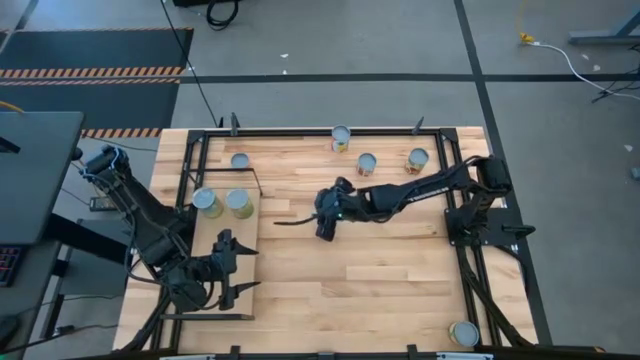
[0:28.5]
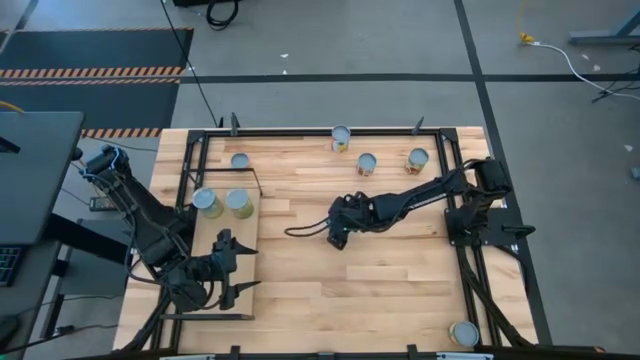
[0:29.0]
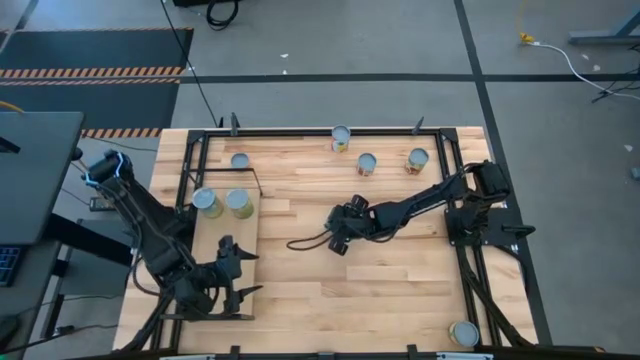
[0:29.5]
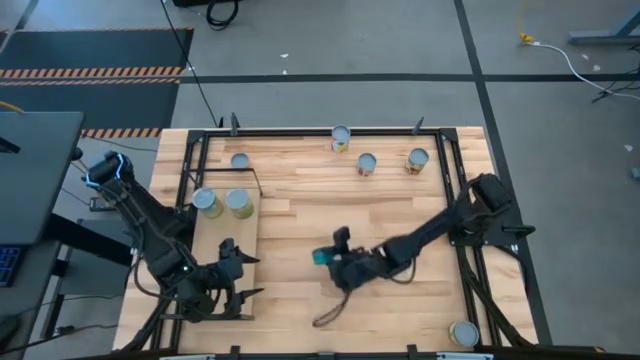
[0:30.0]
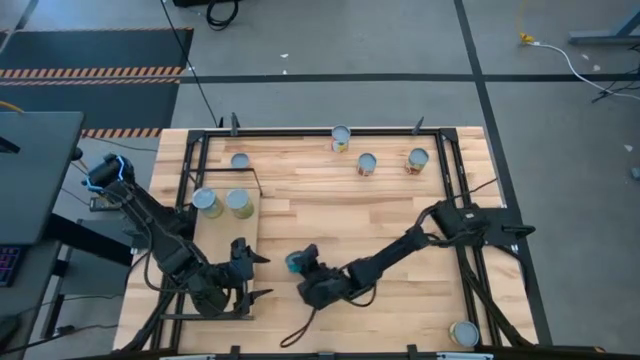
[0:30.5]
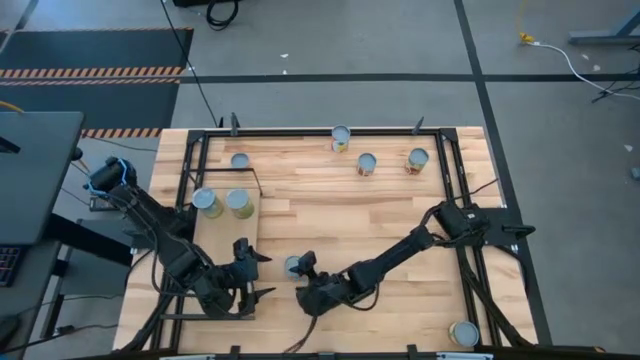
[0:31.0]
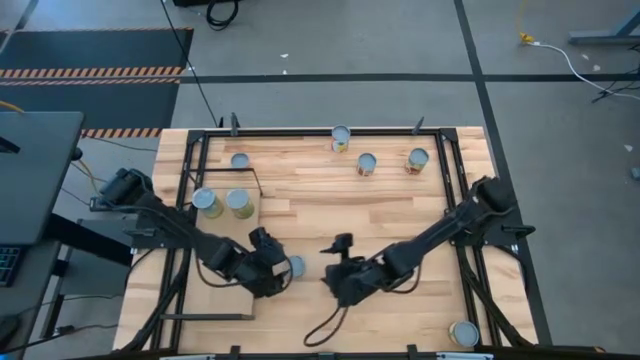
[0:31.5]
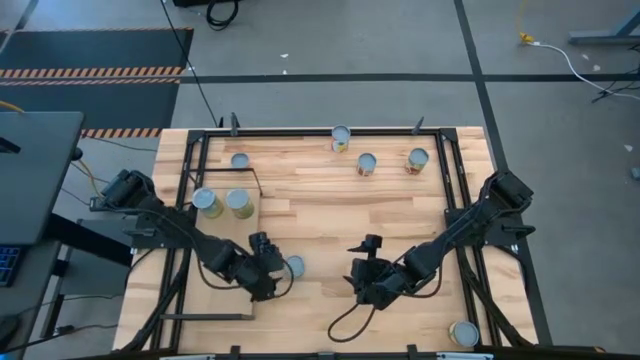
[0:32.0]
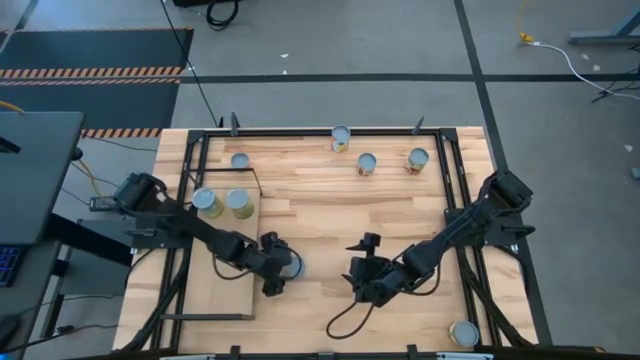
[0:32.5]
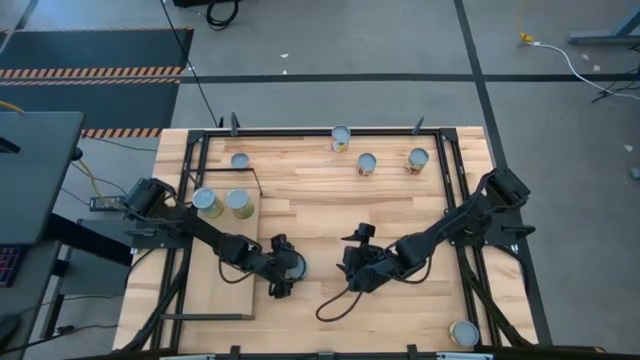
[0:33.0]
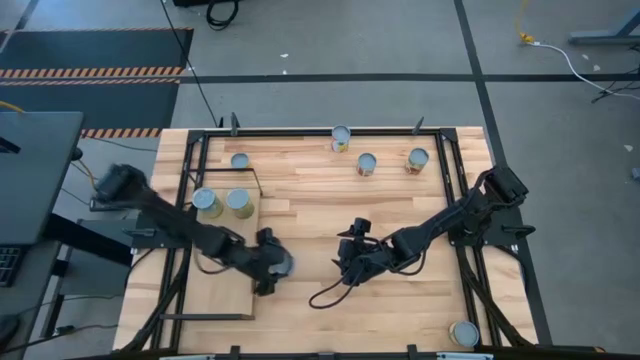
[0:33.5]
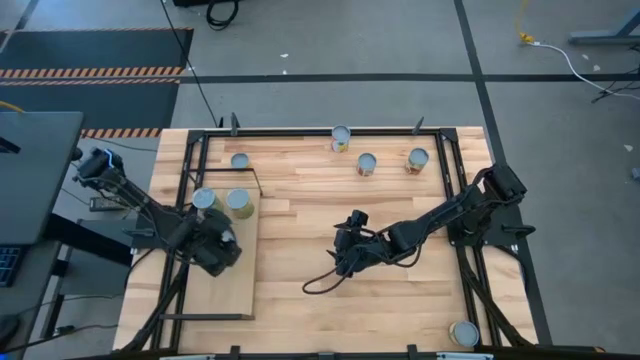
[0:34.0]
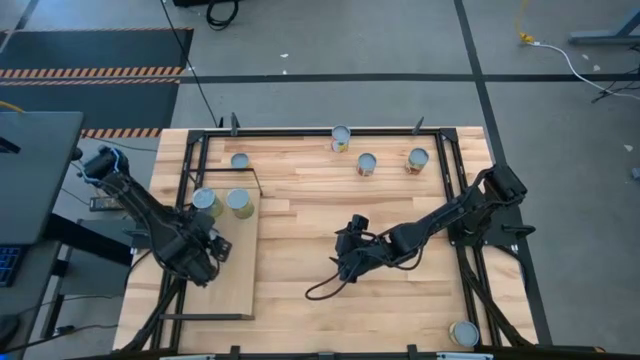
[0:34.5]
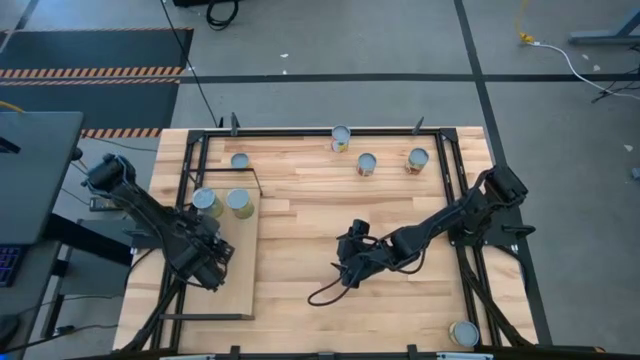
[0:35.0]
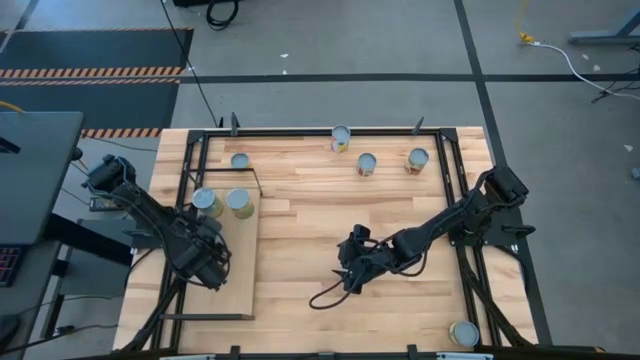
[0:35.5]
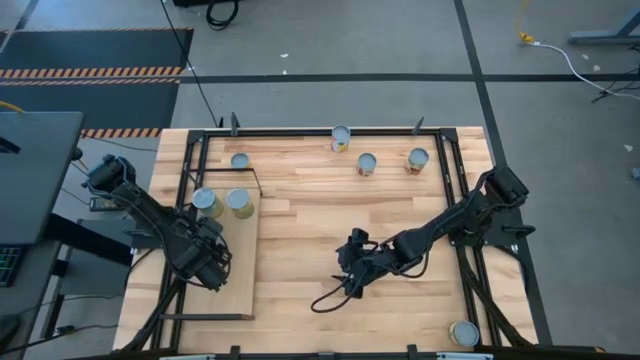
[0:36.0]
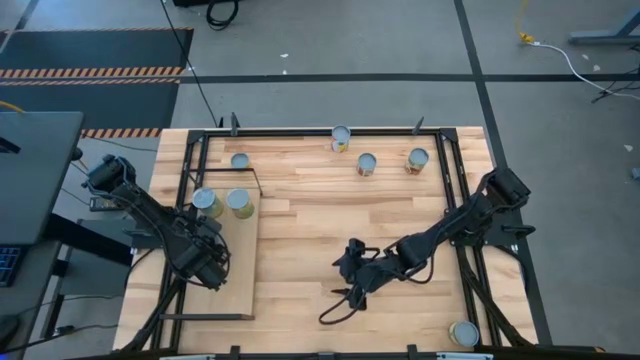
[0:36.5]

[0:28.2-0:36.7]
Task: Pick and place cans onto a shelf
Put the canned tuna on the shelf

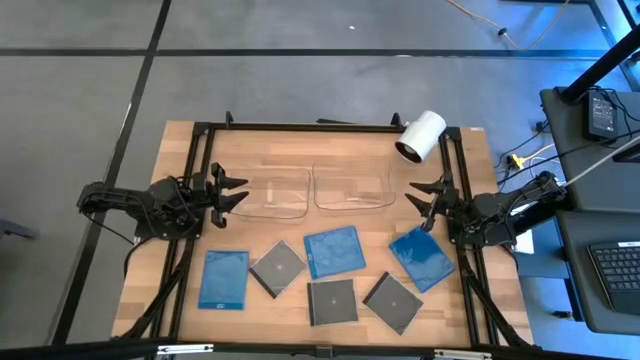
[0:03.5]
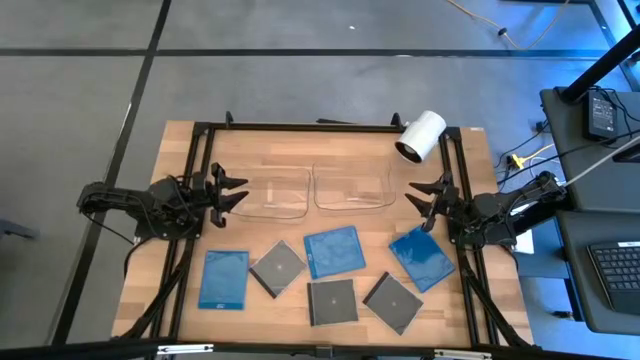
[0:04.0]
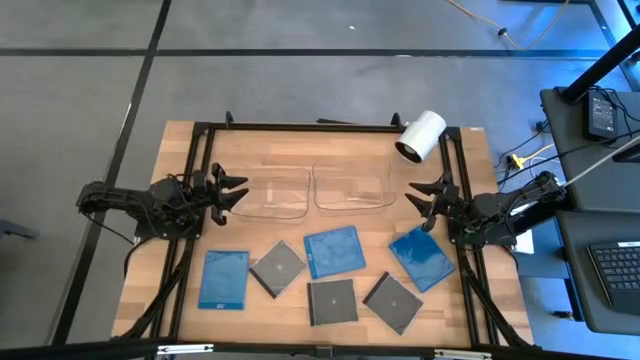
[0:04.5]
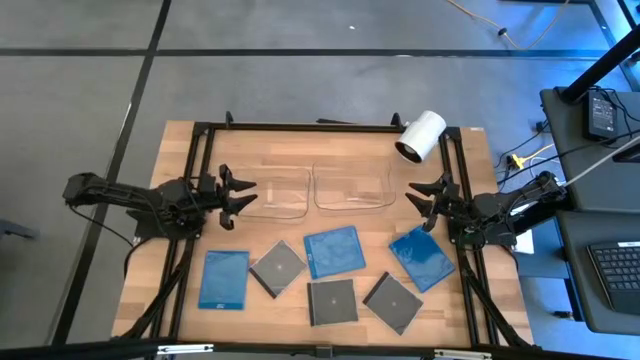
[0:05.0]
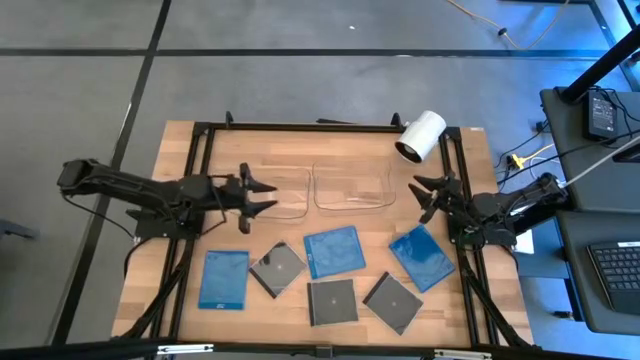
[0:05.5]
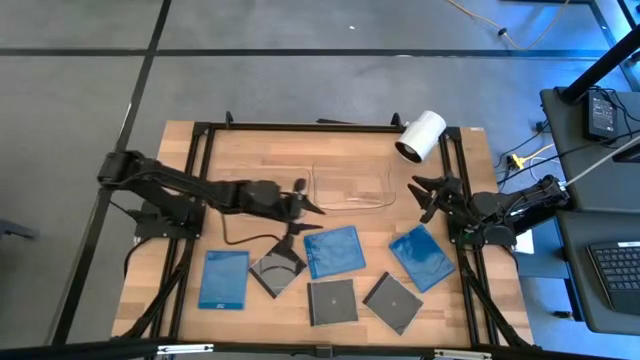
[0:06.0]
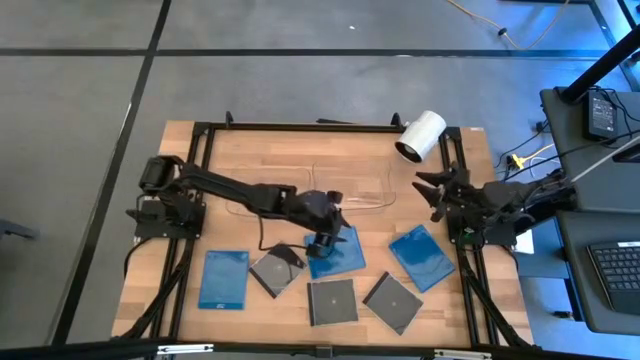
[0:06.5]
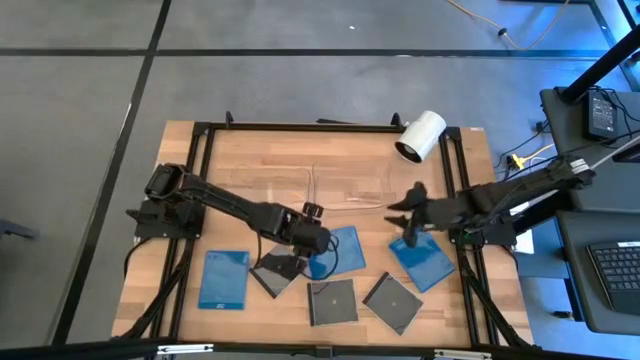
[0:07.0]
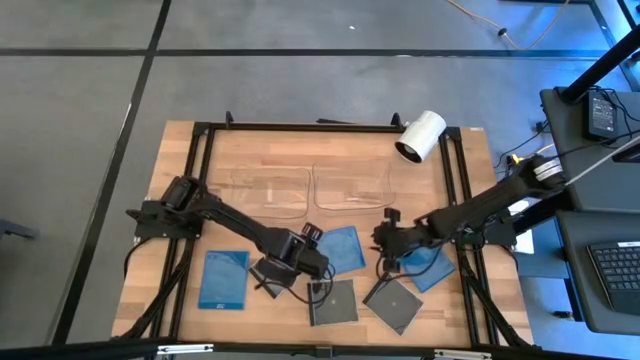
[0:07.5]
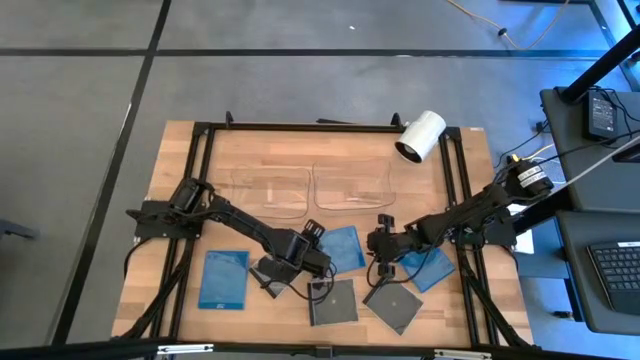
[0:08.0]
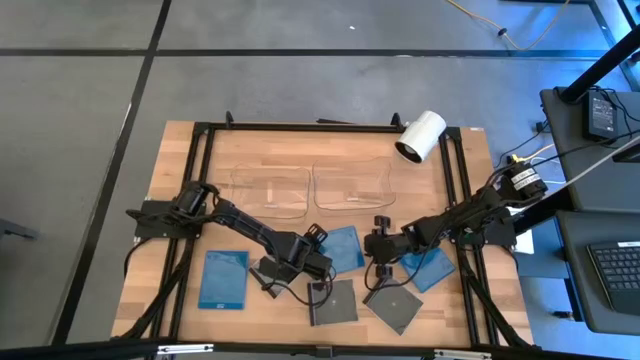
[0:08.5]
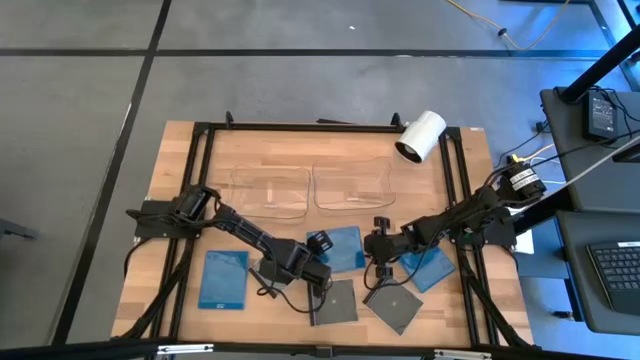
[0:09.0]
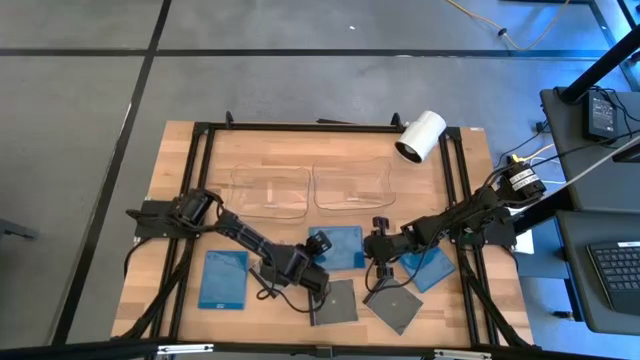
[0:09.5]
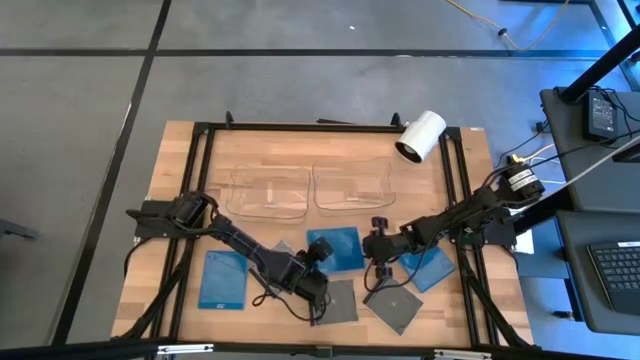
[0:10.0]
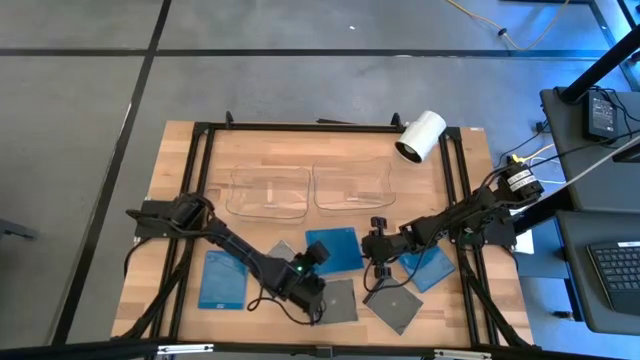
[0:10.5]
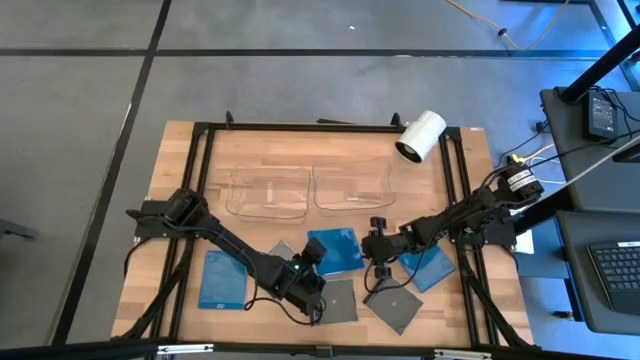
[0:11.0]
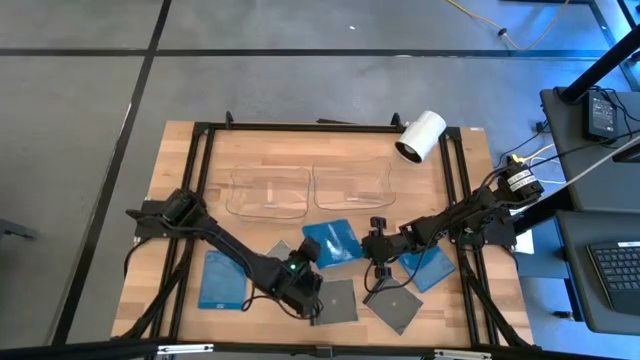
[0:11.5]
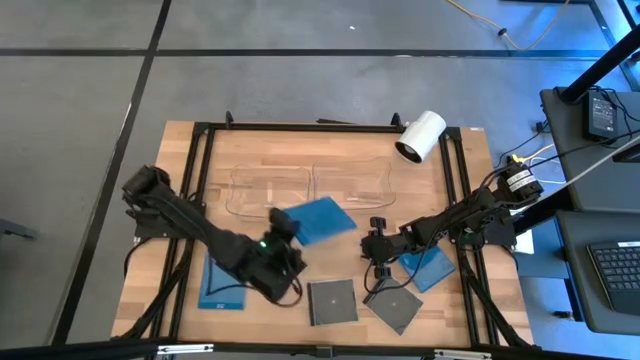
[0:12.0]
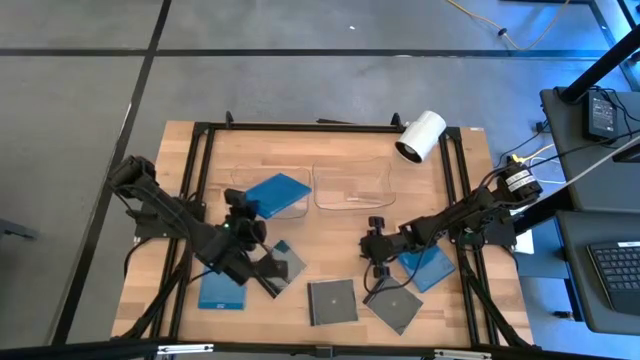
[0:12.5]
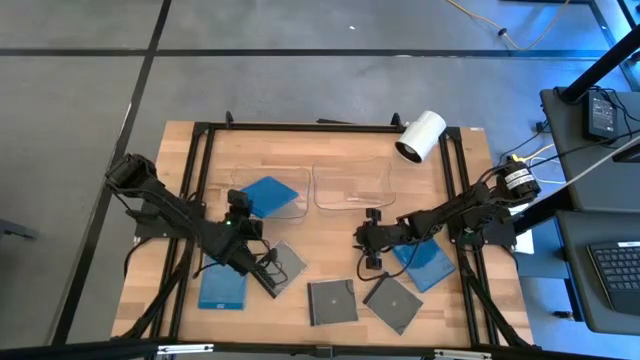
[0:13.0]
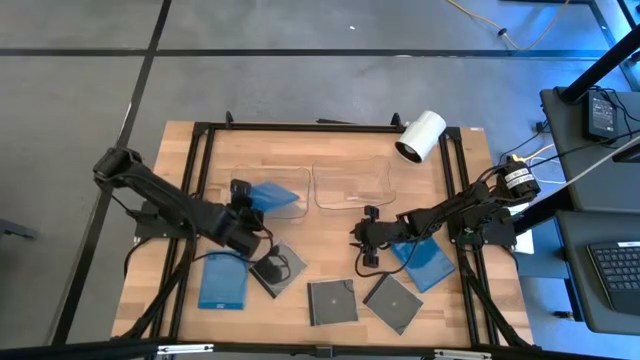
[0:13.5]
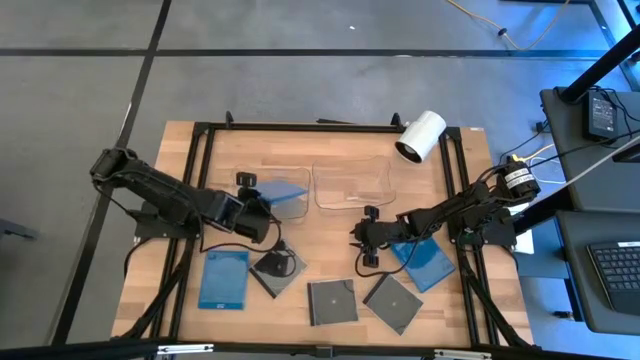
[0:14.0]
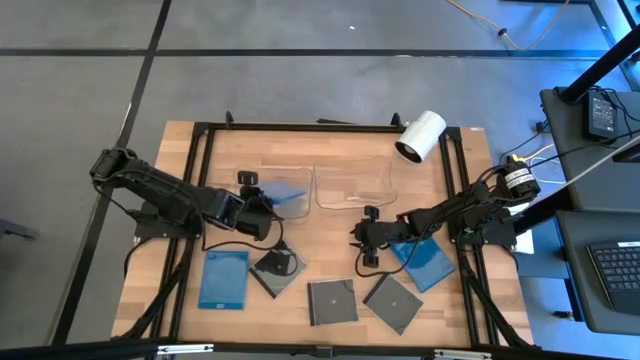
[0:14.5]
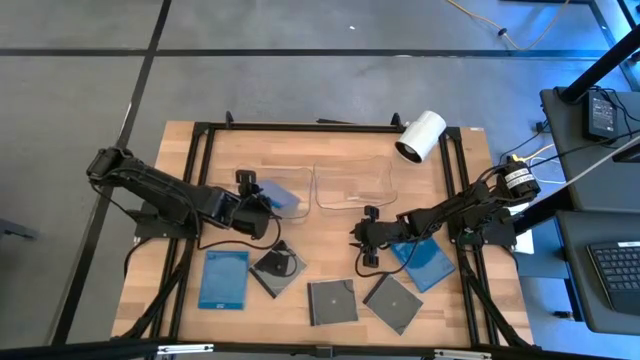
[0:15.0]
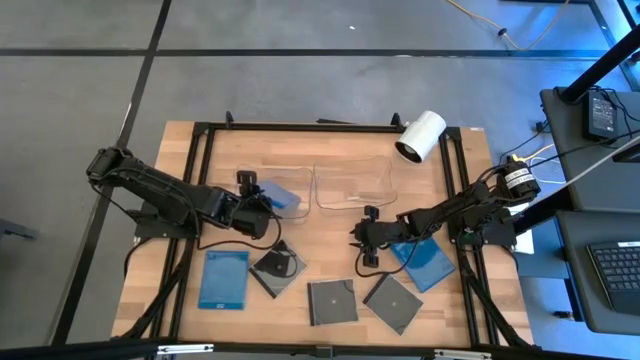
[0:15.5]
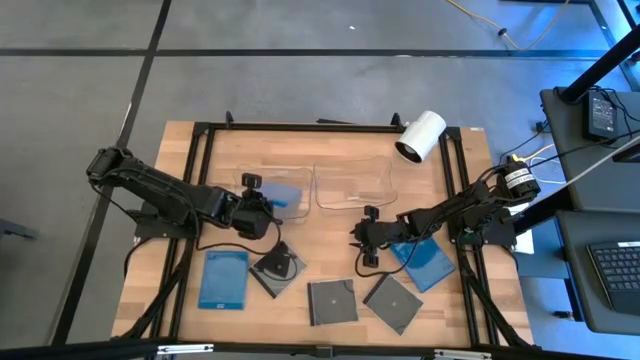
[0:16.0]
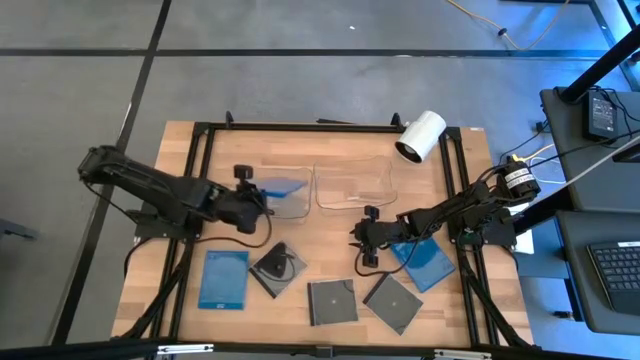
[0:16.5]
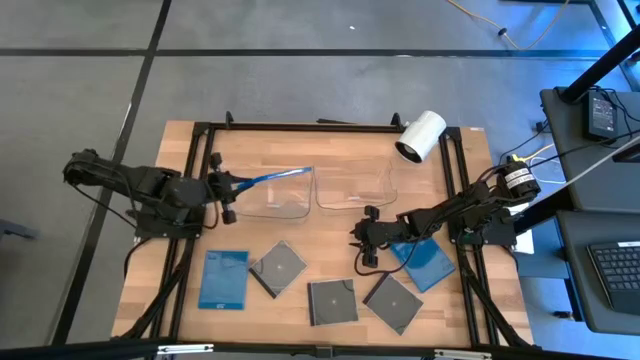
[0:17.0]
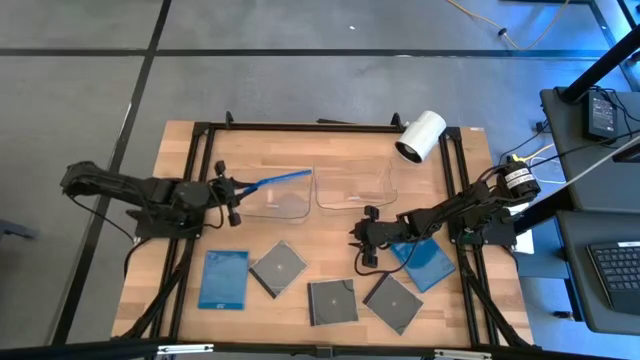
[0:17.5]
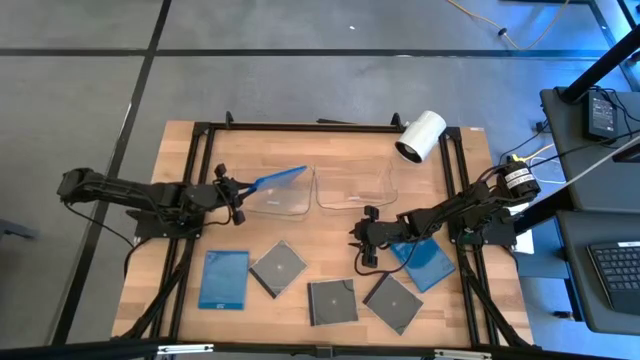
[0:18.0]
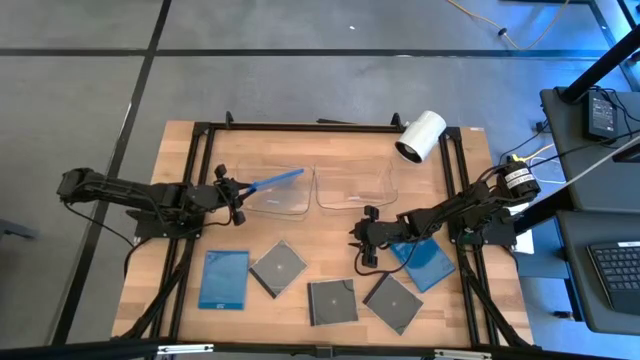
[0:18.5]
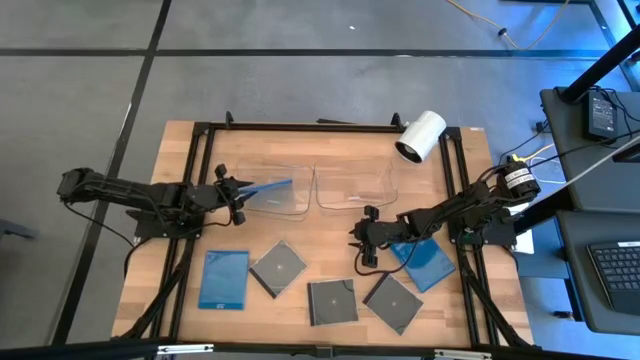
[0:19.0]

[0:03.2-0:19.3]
Task: Pick & place jewel cases by type
Put the middle blue CD case into the left transparent bin
